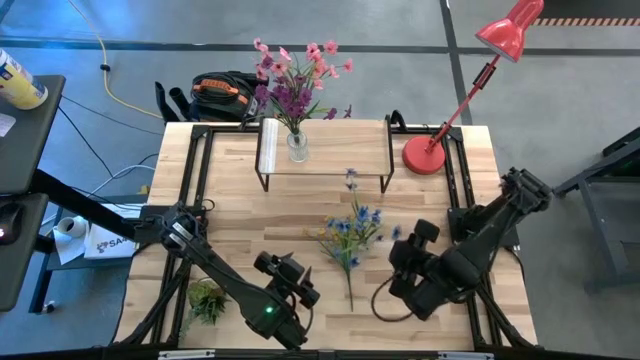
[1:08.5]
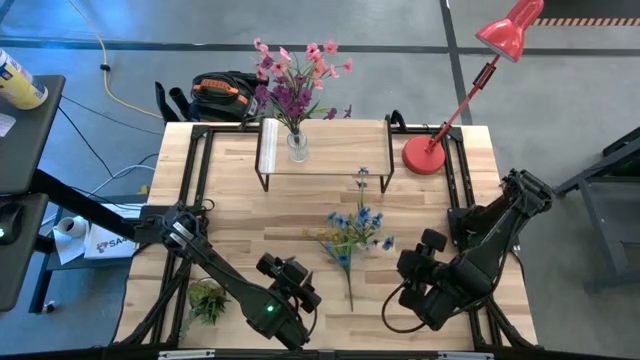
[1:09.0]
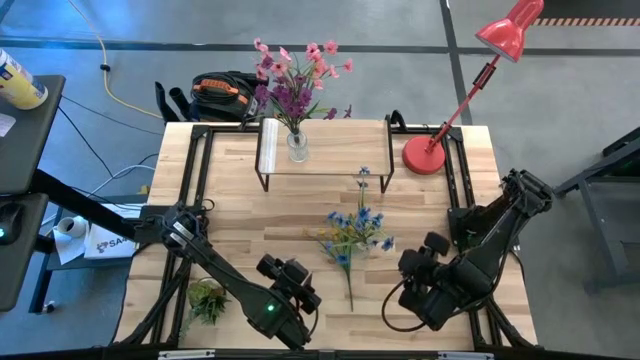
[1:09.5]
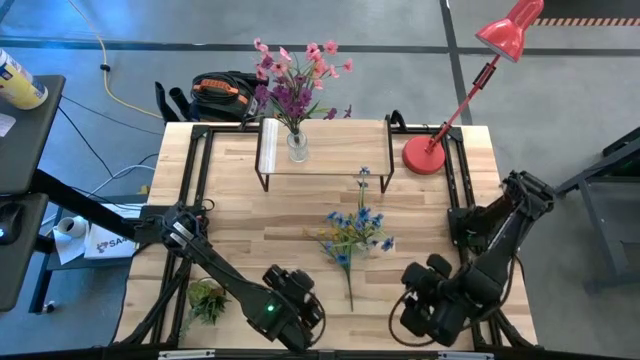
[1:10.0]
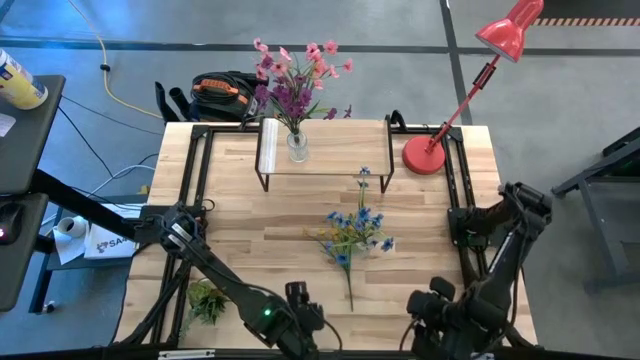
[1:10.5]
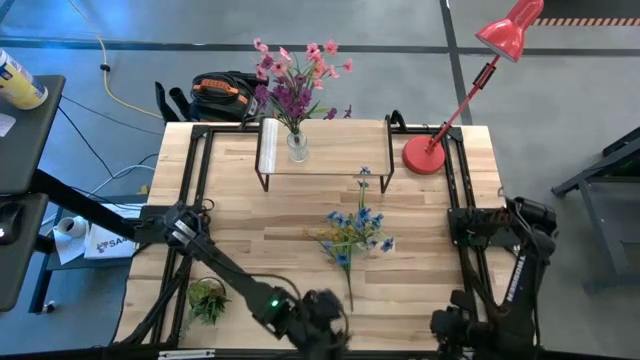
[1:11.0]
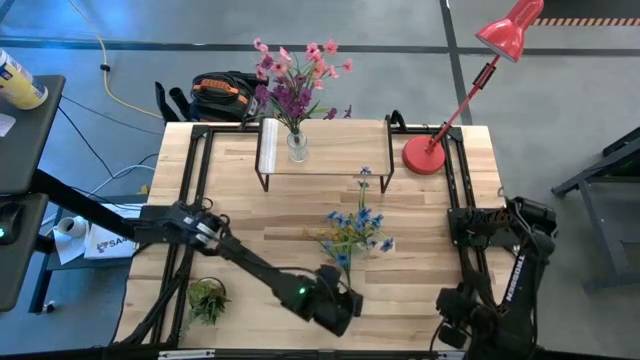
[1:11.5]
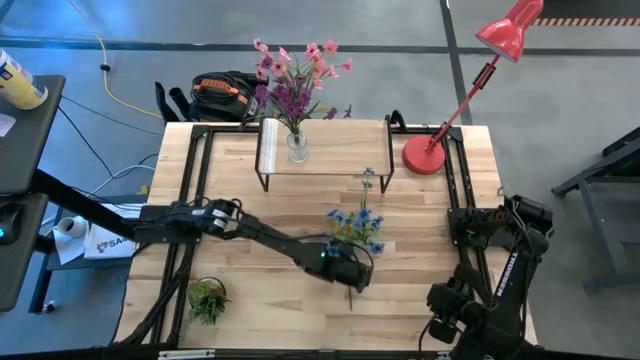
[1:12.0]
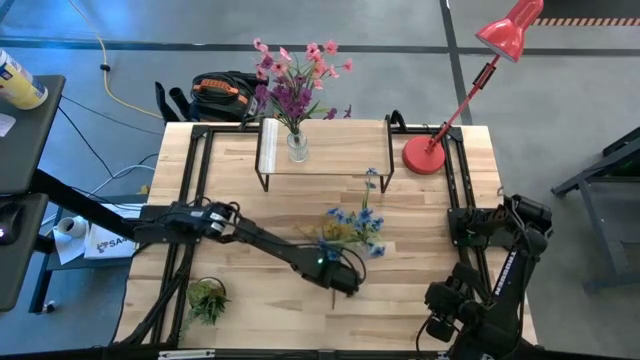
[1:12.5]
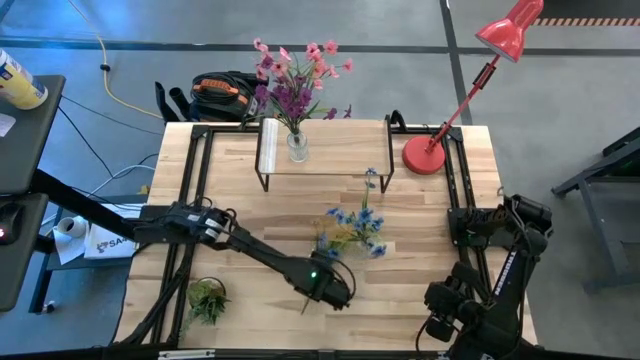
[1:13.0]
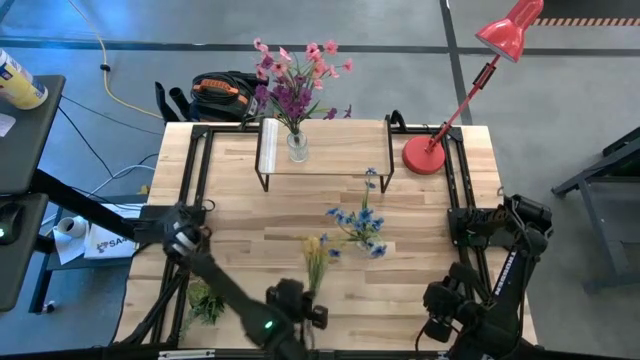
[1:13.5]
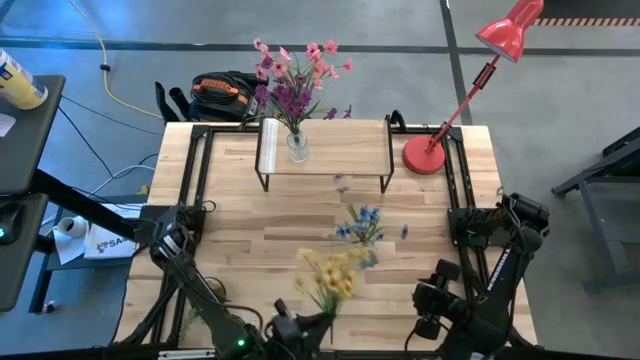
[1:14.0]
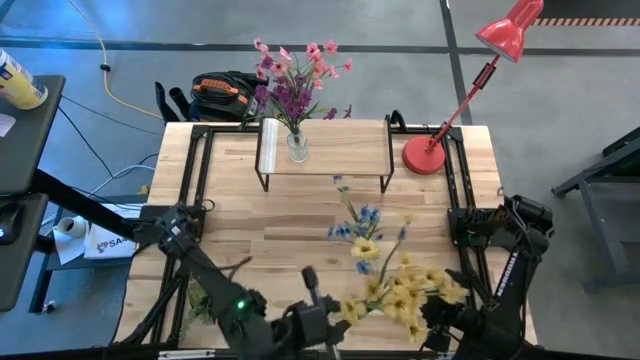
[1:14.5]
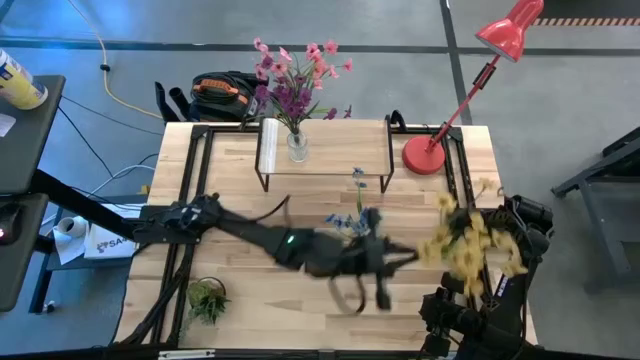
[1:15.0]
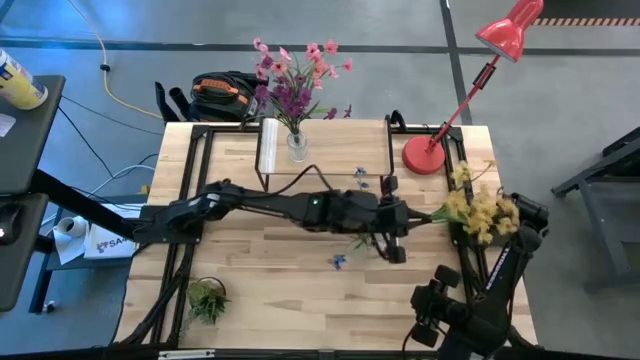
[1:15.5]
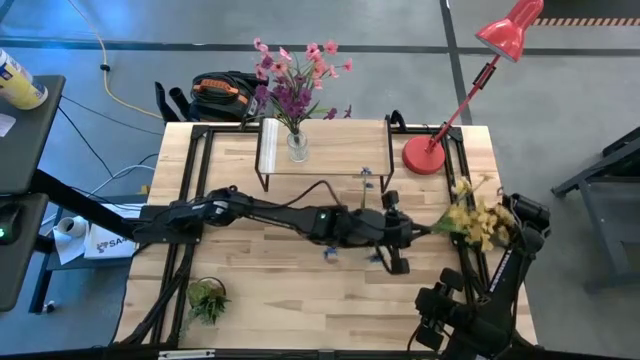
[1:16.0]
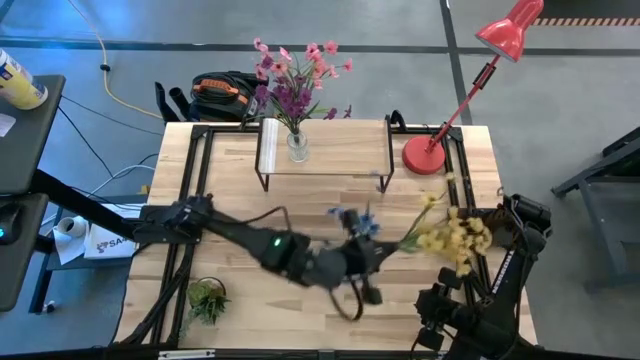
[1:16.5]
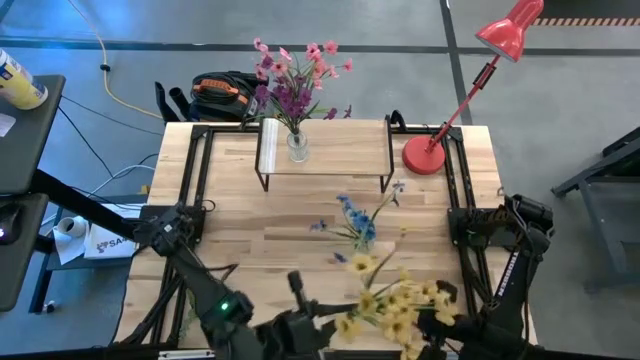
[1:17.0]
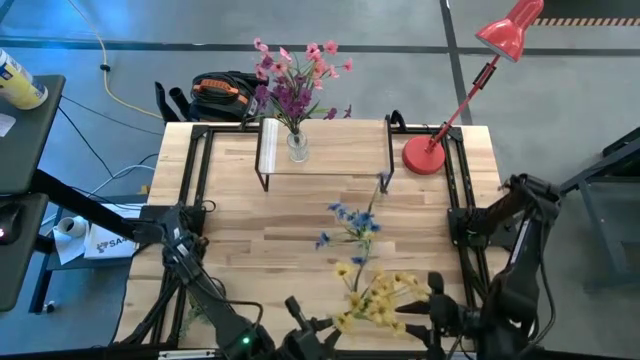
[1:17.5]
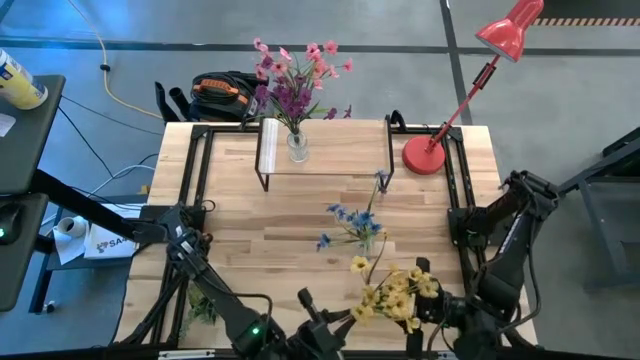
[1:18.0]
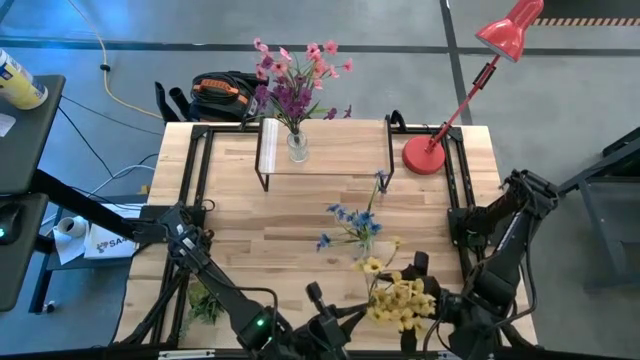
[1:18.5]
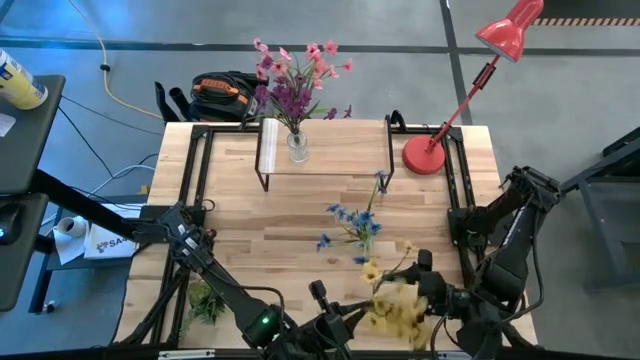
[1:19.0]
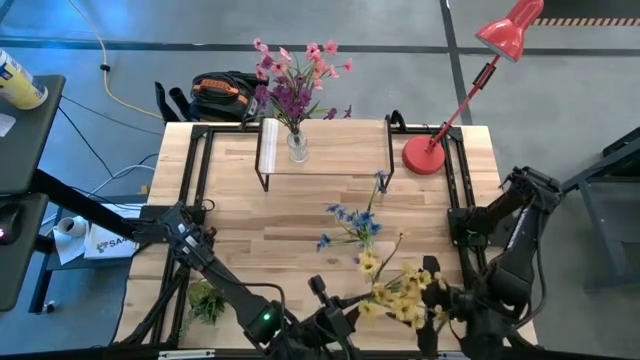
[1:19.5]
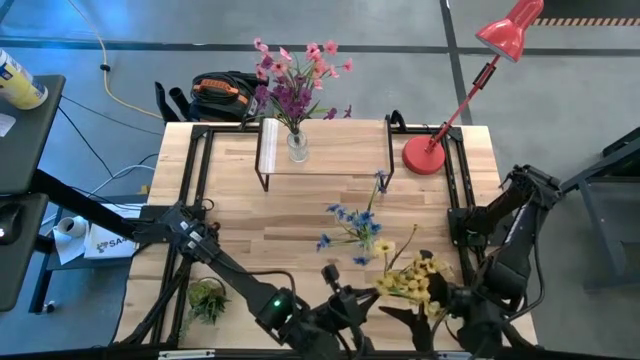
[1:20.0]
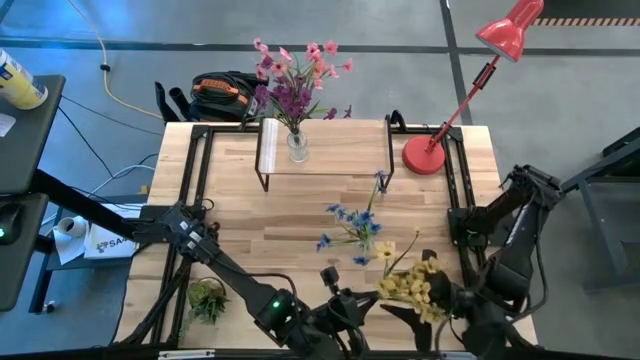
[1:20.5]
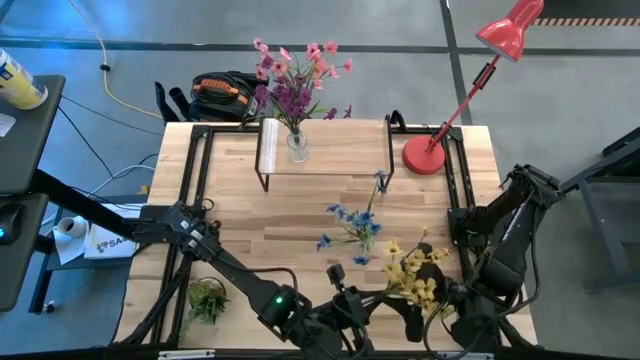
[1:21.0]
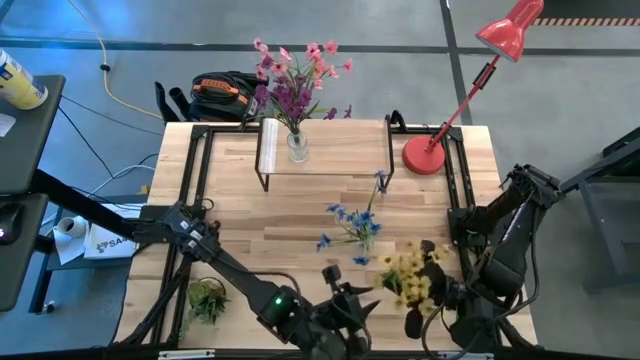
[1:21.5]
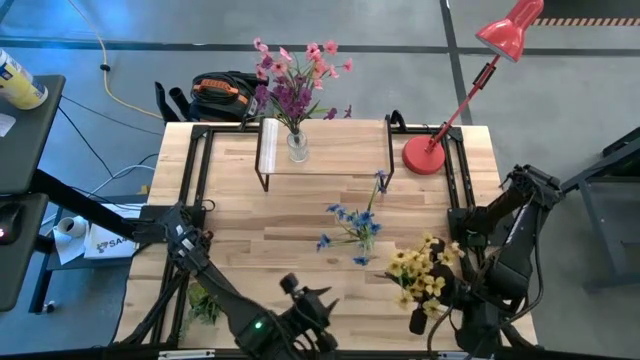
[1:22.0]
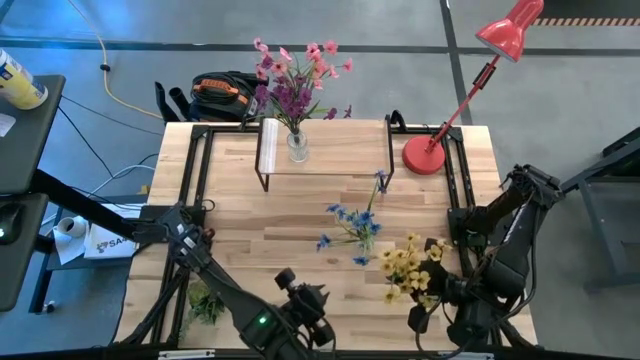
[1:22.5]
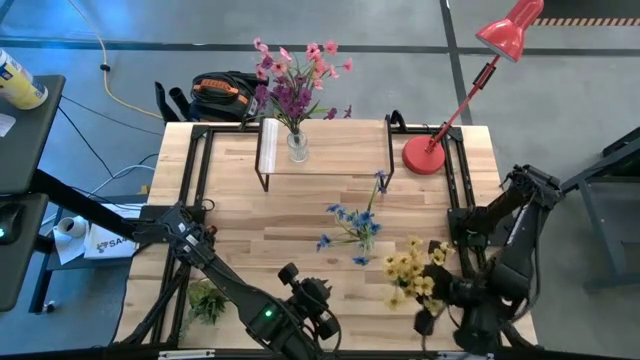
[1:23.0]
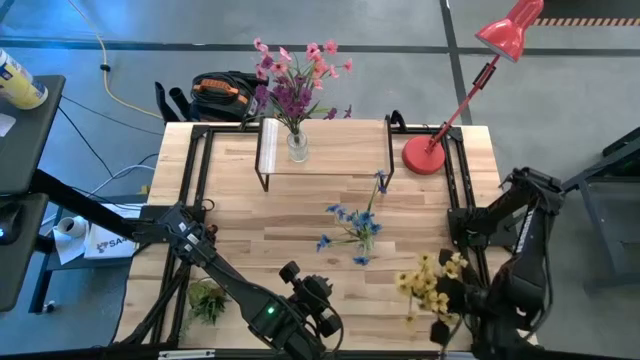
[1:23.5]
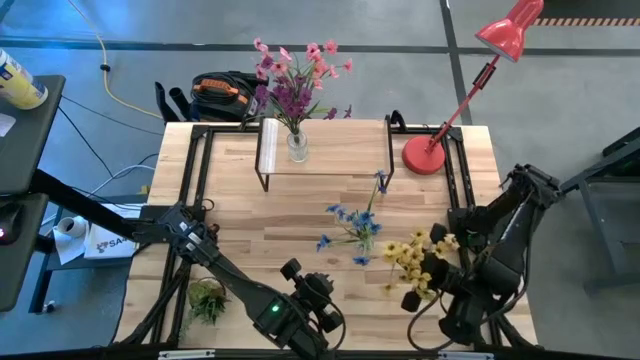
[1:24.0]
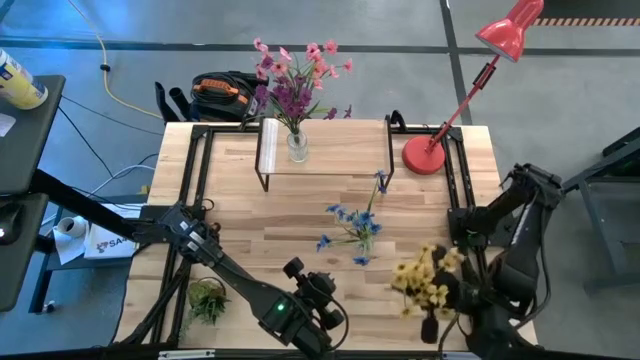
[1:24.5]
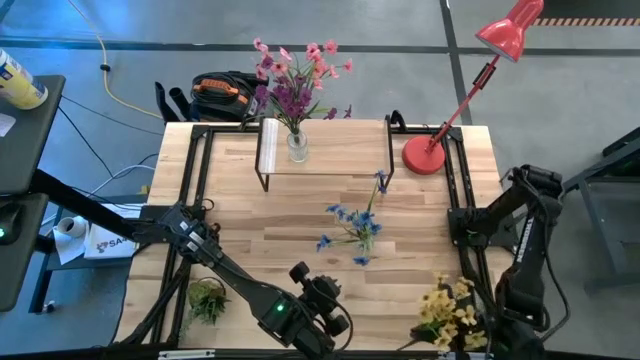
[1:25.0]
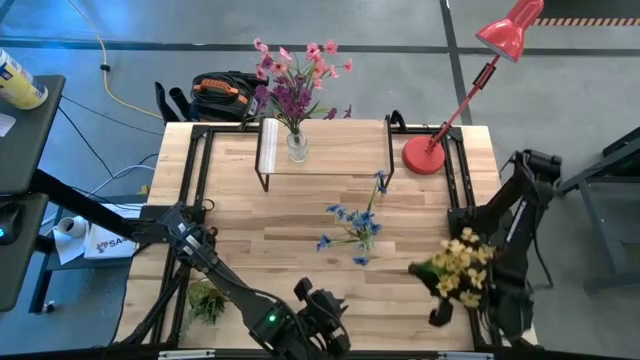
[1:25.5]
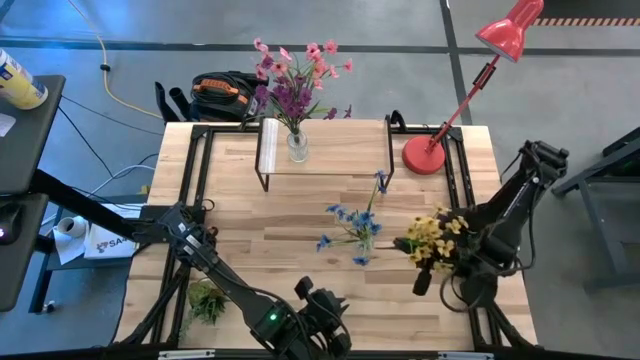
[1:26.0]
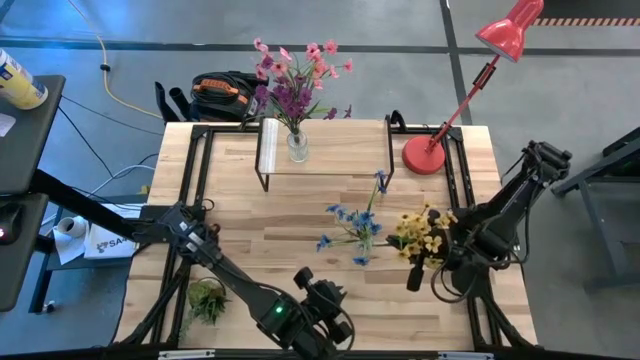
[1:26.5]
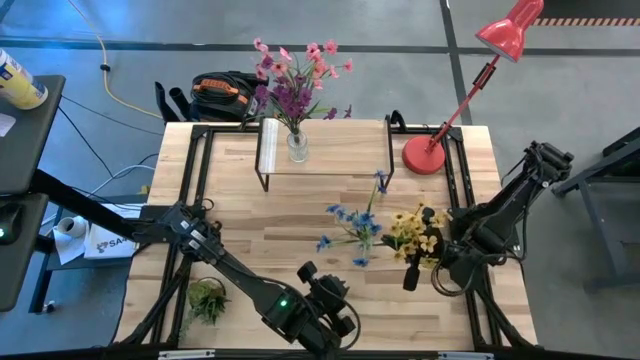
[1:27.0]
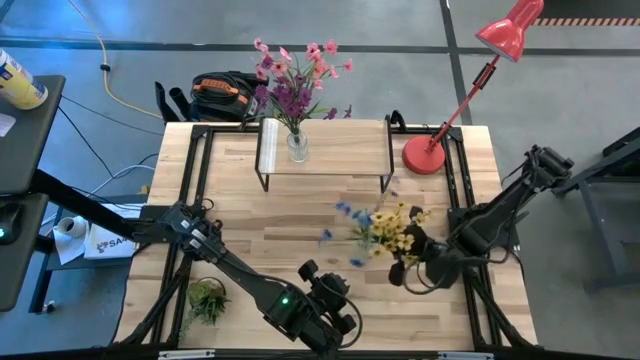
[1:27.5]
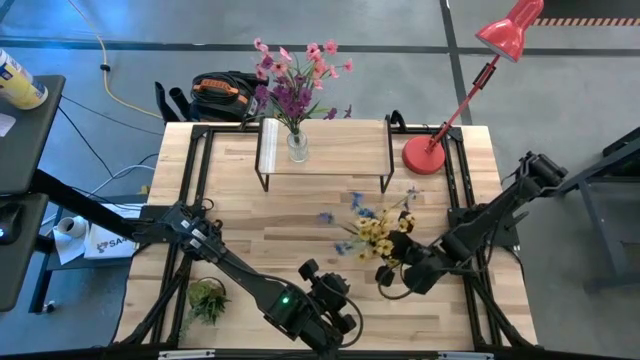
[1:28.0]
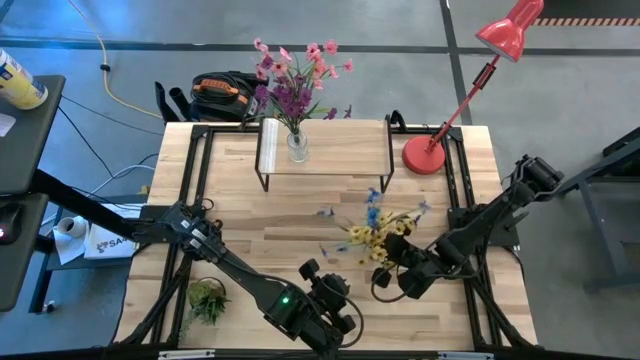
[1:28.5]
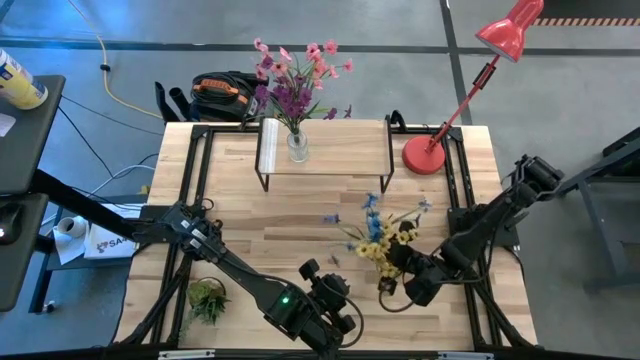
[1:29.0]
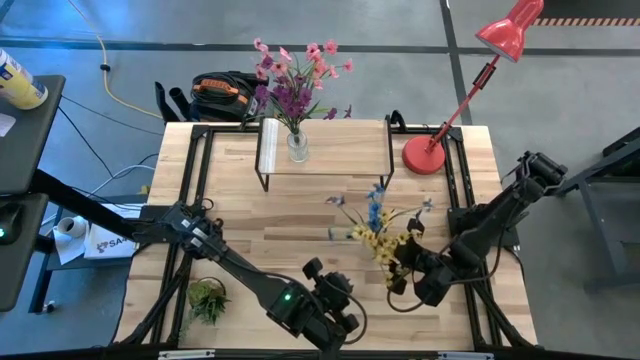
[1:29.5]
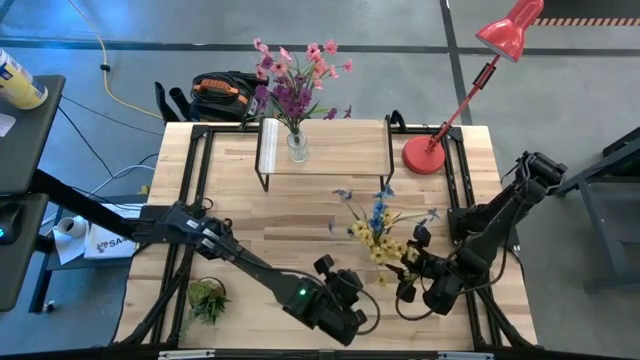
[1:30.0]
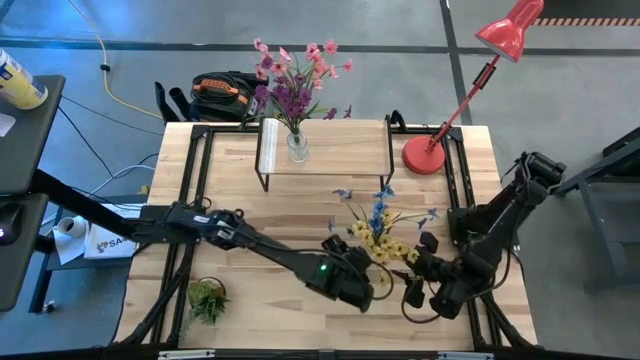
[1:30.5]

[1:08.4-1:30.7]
Task: Pick and place flowers into a vace then onto a shelf
Put the yellow flowers into the transparent vase
